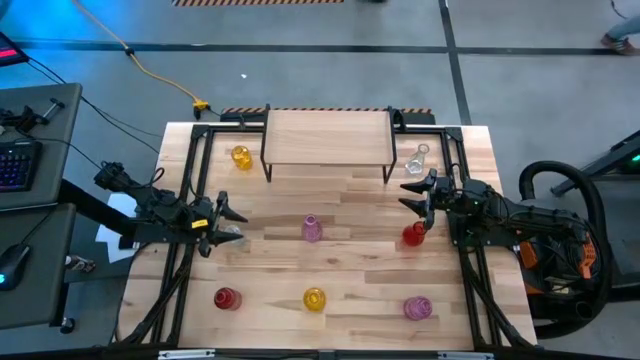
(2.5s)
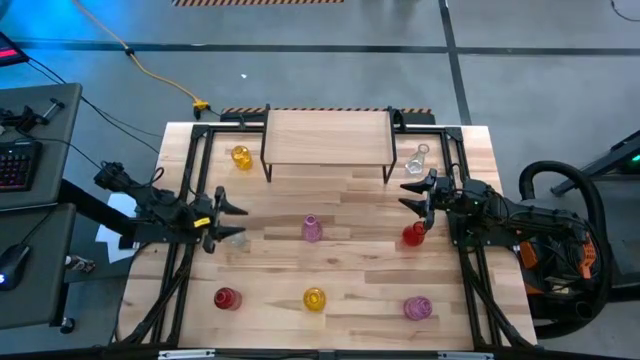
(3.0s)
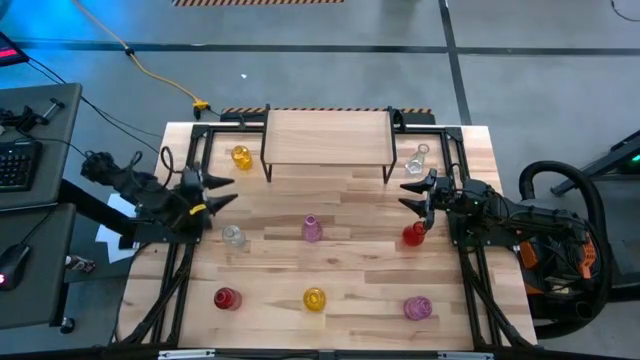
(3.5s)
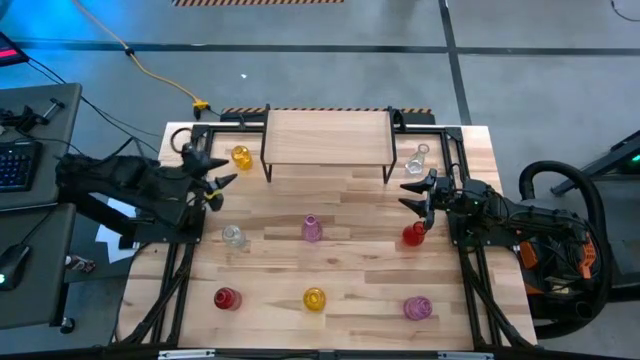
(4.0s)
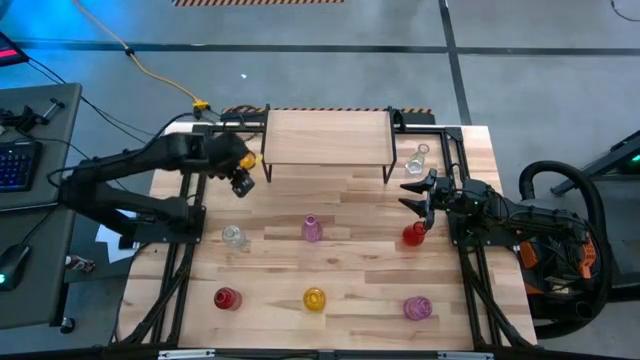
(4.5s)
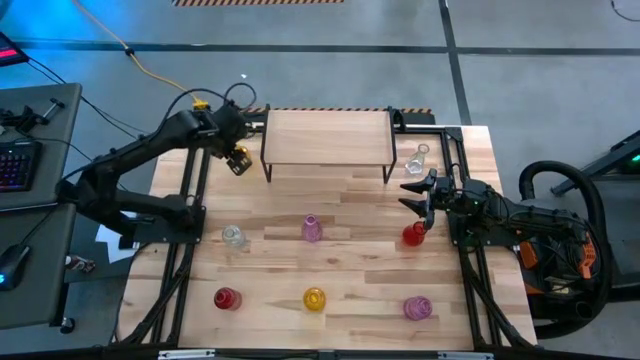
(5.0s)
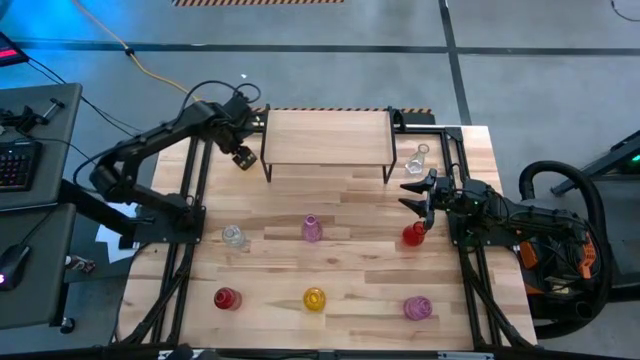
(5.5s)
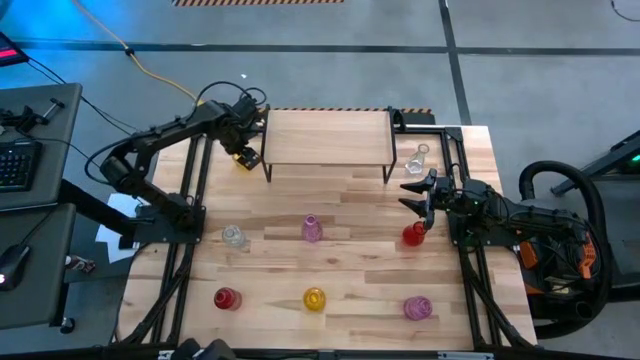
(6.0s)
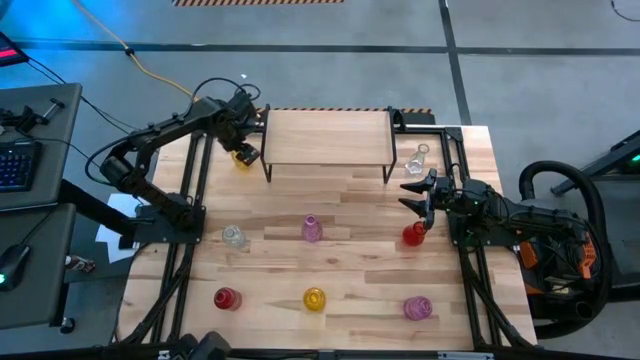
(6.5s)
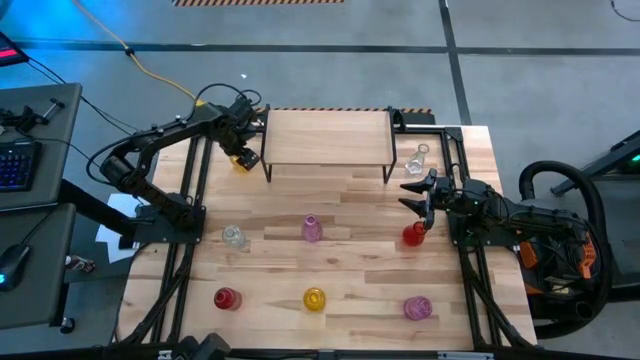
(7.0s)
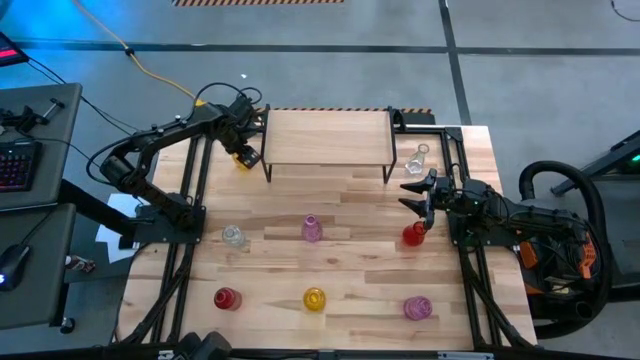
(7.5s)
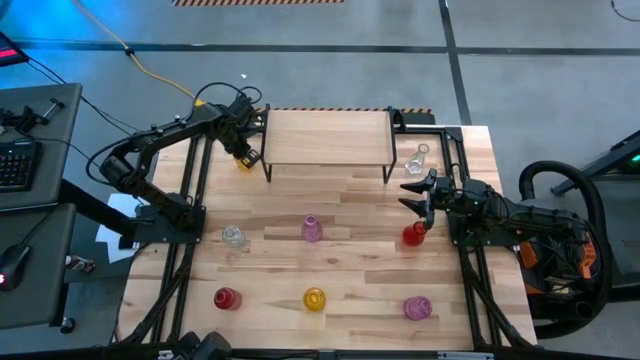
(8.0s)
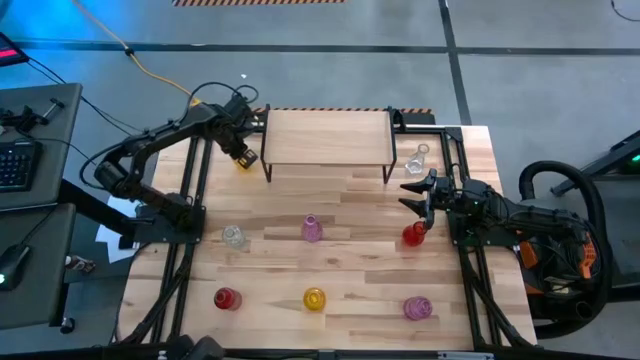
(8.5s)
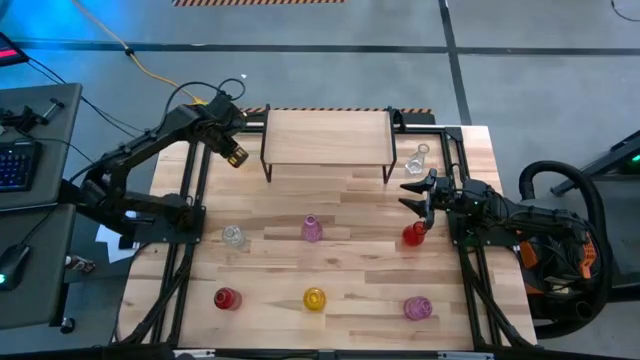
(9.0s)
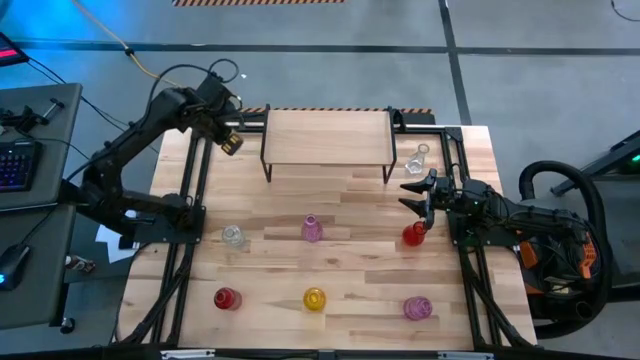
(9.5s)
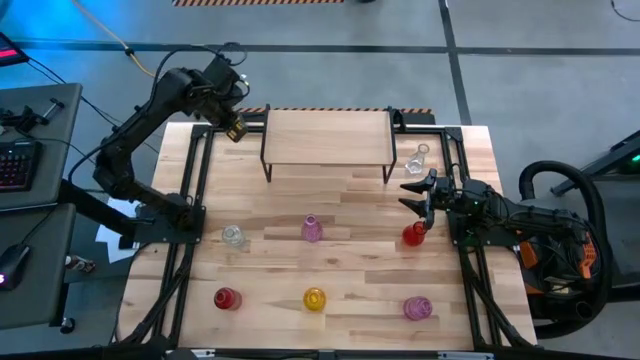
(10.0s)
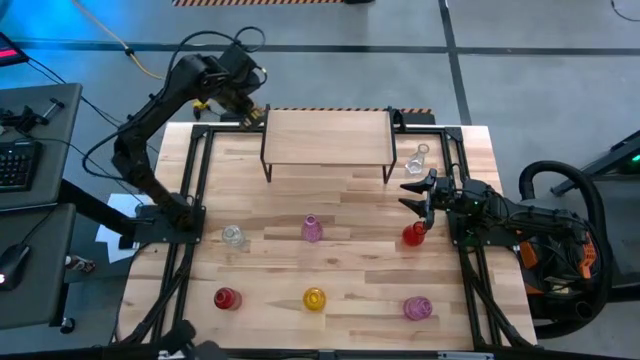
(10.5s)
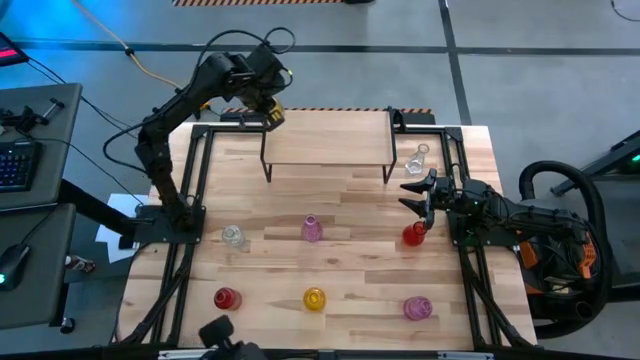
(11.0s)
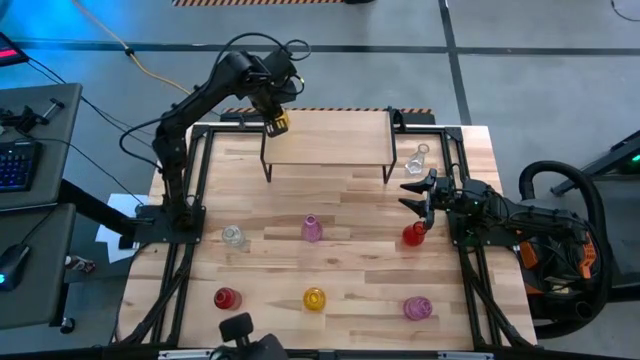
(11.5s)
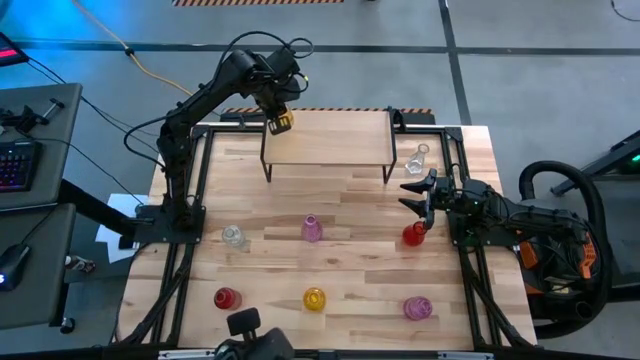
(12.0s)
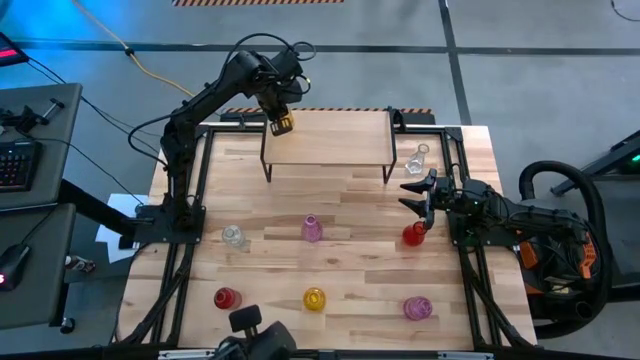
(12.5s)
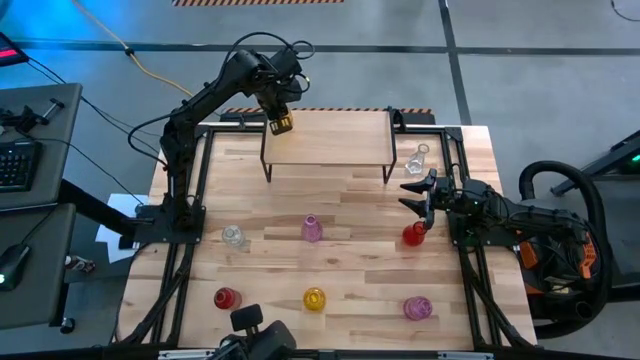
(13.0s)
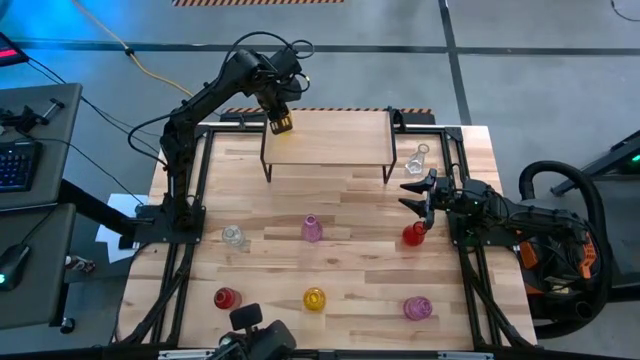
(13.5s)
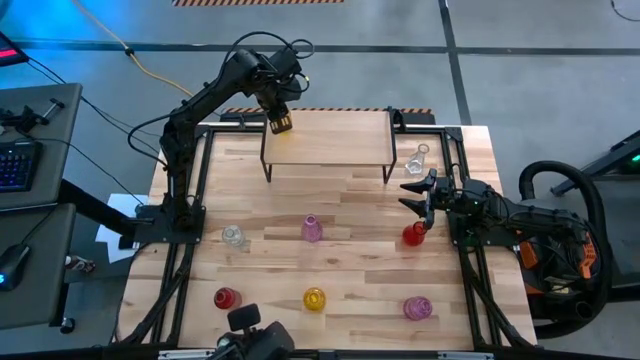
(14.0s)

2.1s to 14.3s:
Task: sort vases onto shelf
Put the top yellow vase on the shelf

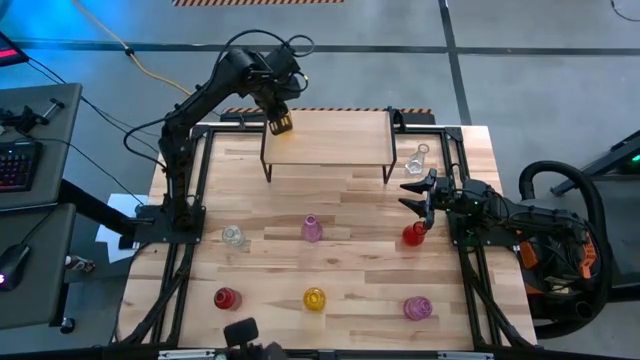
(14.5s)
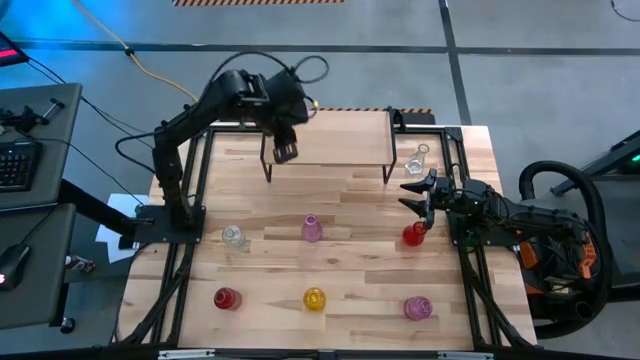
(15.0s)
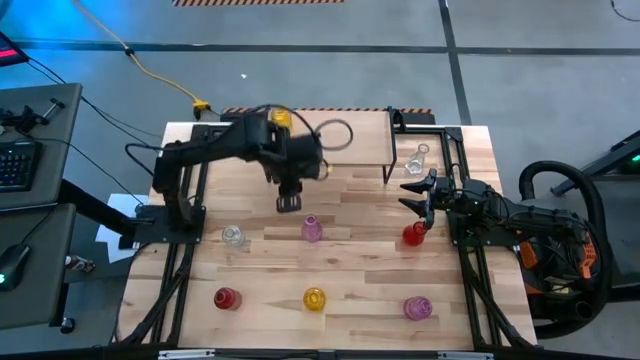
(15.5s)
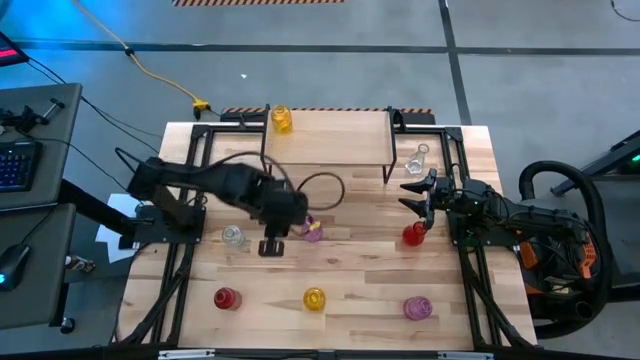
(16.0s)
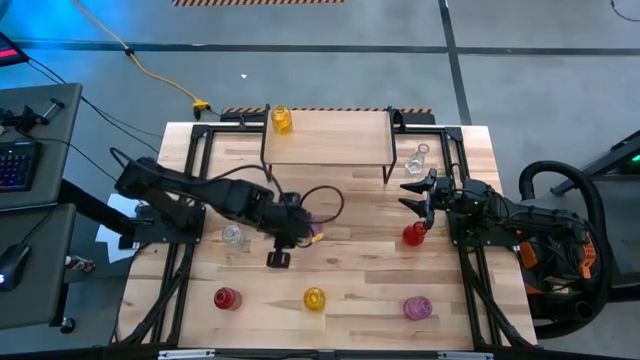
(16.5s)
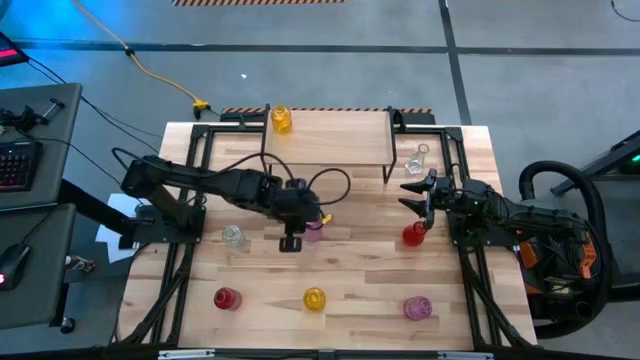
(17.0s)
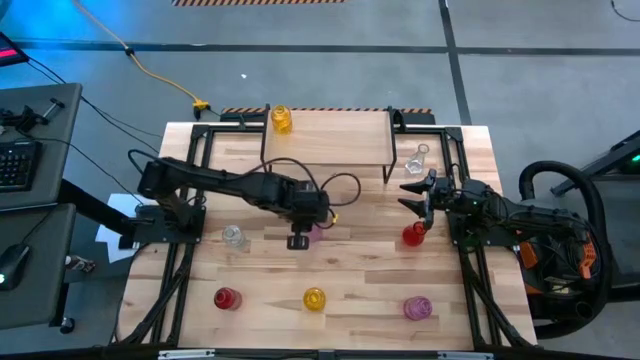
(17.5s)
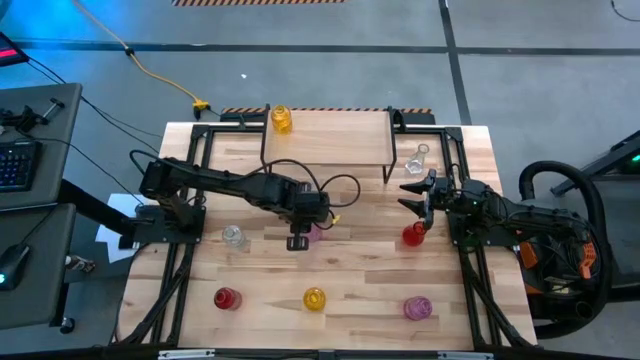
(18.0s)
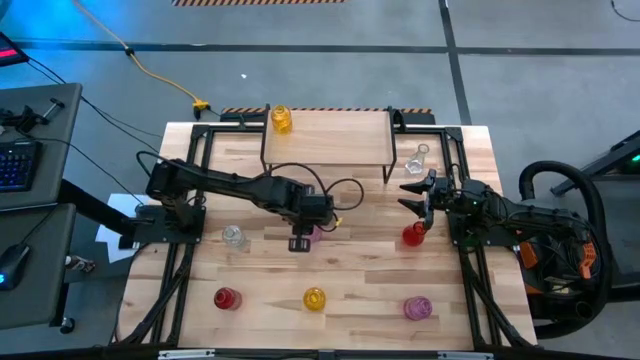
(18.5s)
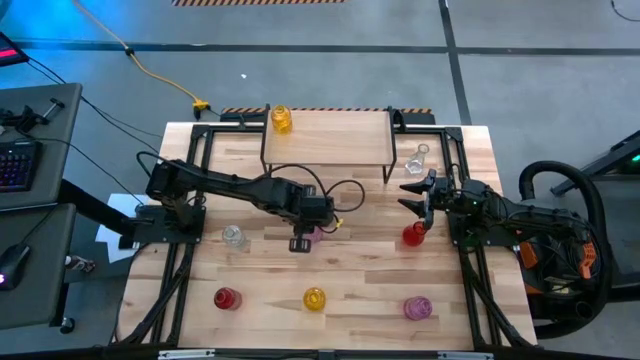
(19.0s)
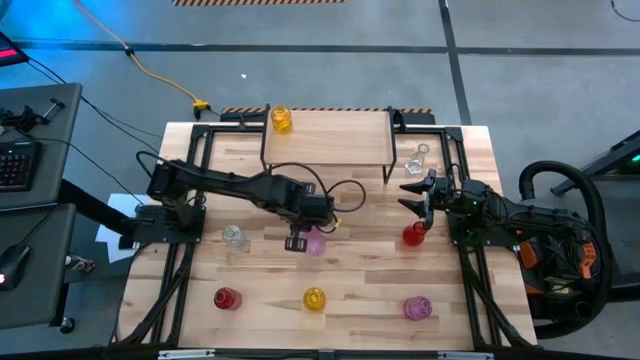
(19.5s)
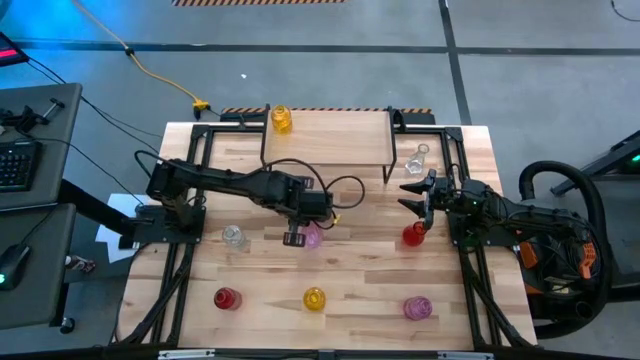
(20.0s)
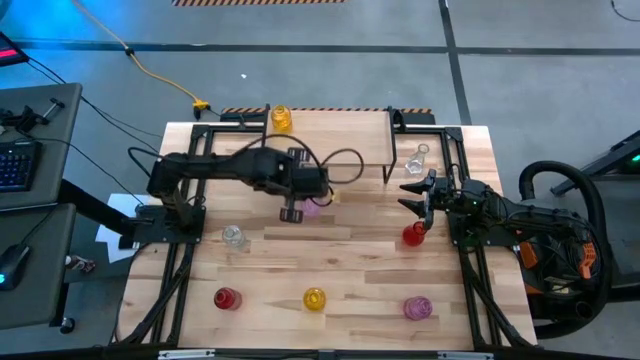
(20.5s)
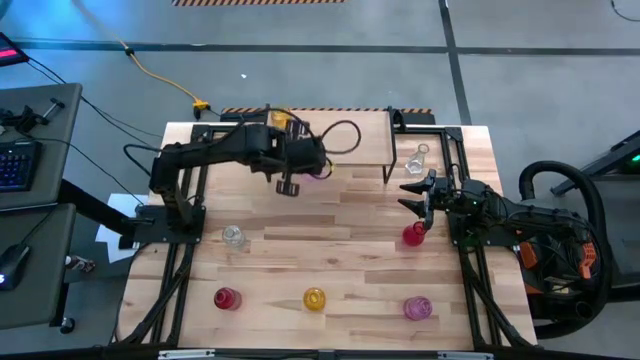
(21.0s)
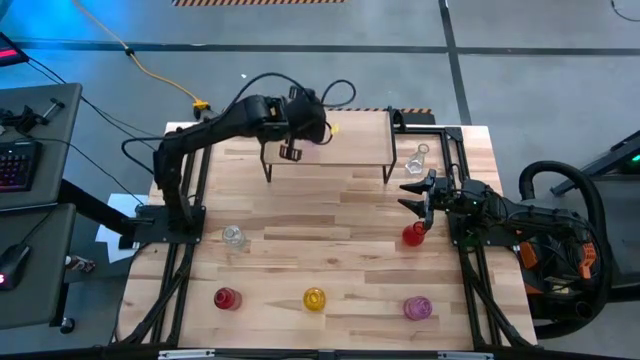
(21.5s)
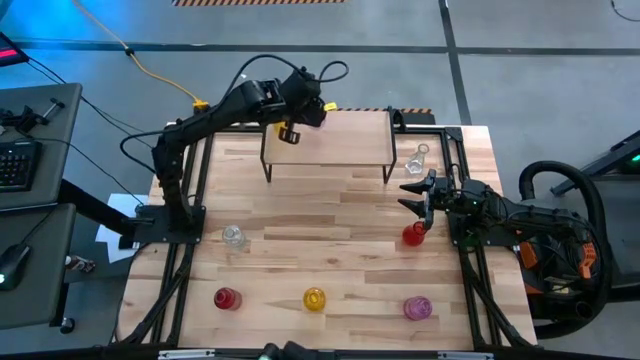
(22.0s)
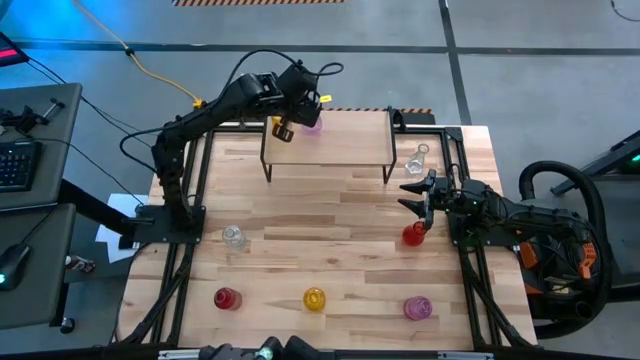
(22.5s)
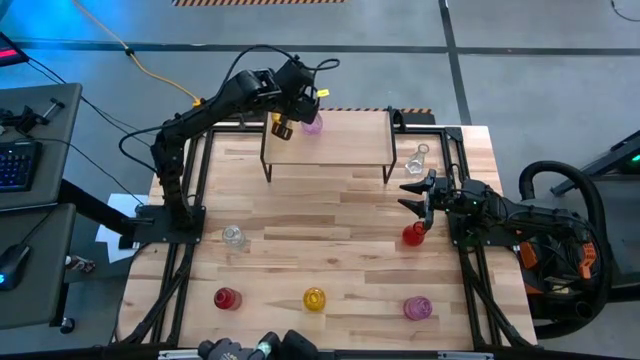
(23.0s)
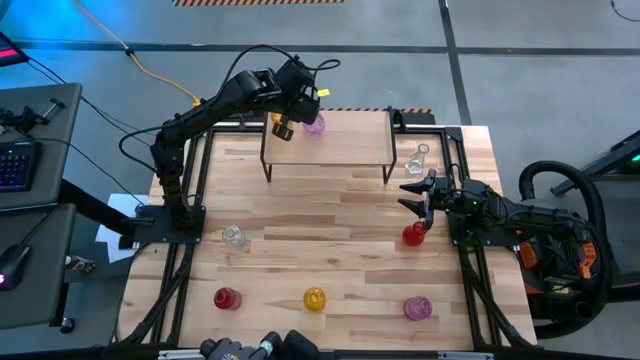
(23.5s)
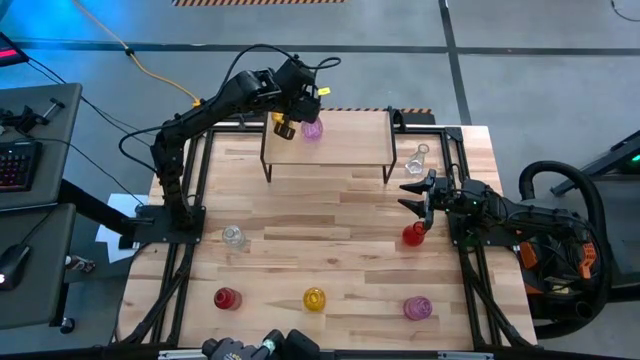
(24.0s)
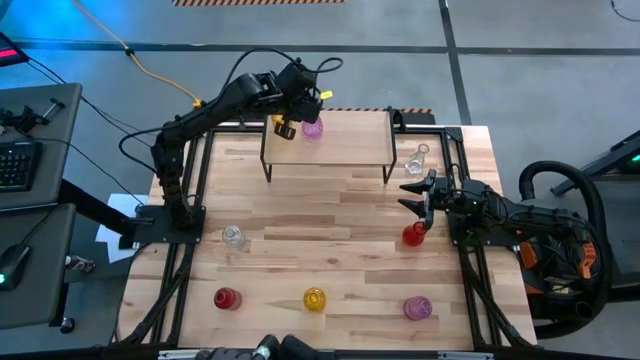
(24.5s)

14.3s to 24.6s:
Put the top purple vase on the shelf
